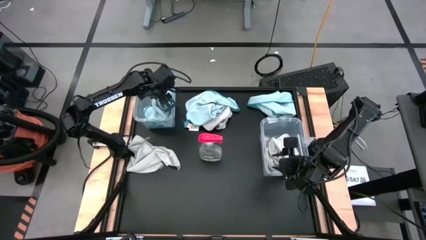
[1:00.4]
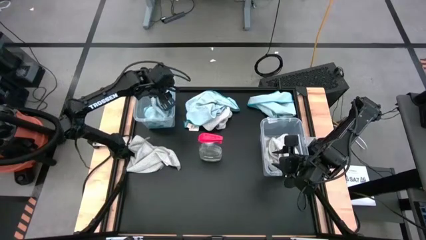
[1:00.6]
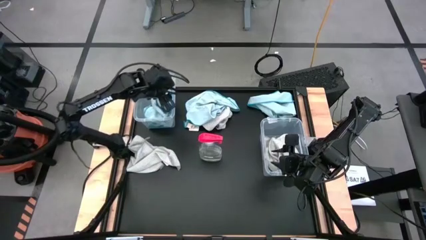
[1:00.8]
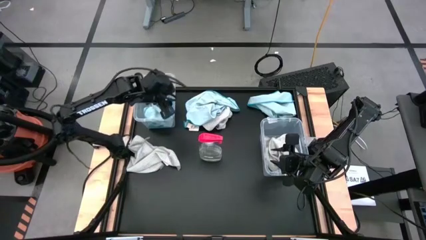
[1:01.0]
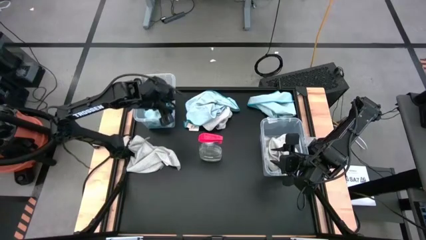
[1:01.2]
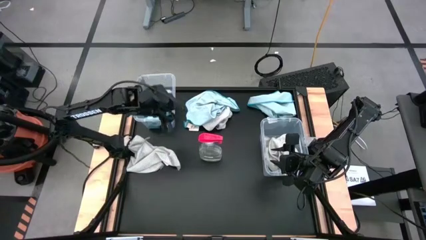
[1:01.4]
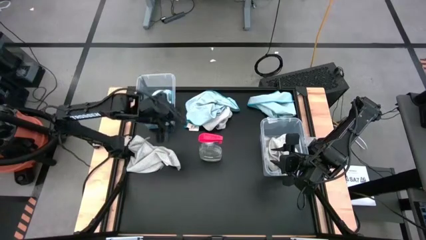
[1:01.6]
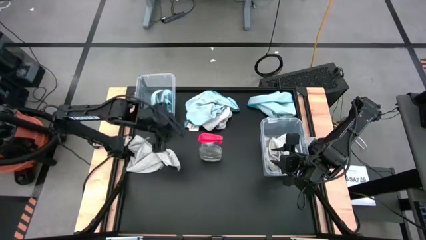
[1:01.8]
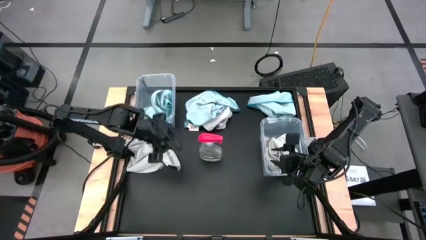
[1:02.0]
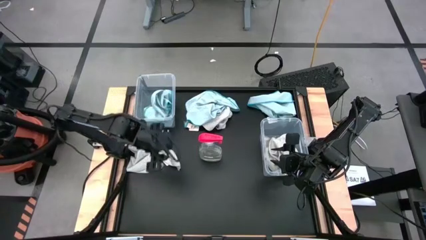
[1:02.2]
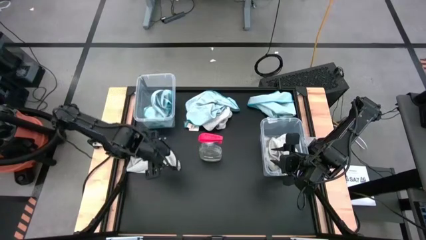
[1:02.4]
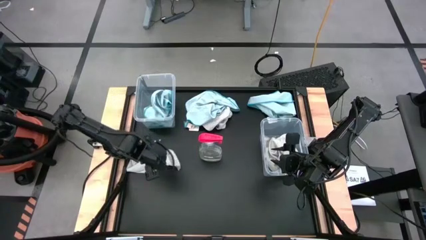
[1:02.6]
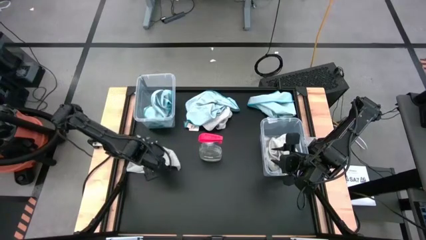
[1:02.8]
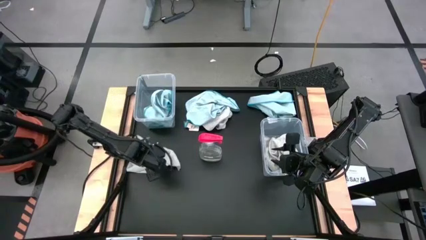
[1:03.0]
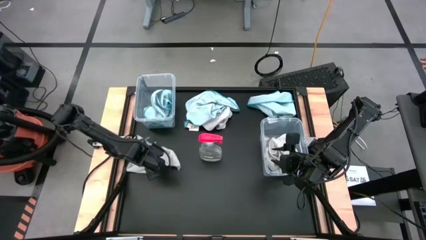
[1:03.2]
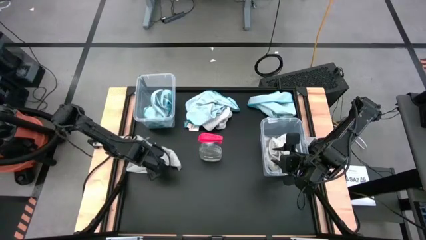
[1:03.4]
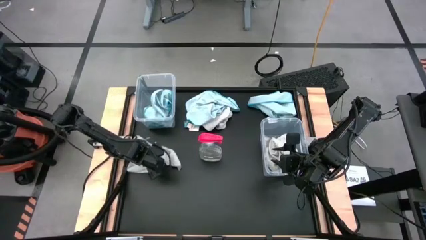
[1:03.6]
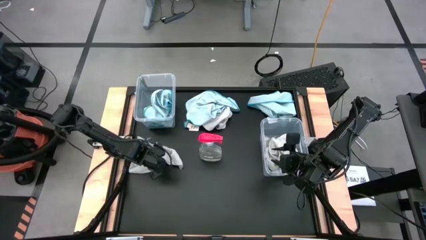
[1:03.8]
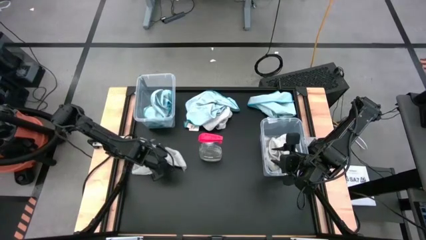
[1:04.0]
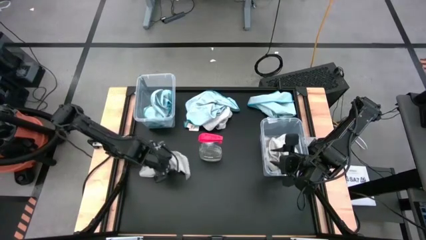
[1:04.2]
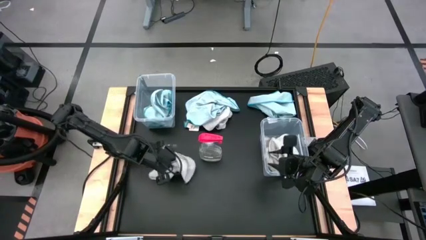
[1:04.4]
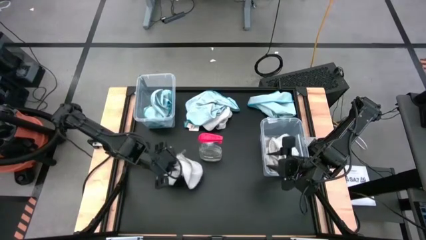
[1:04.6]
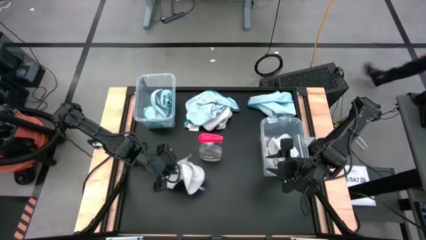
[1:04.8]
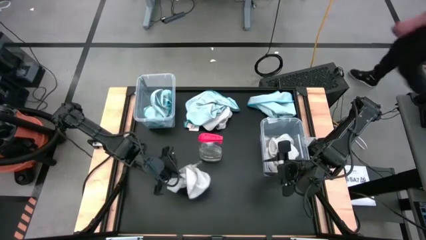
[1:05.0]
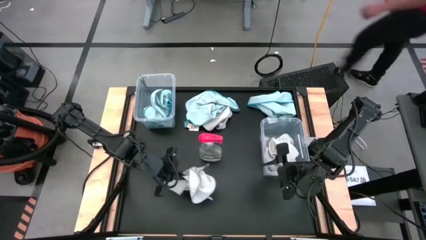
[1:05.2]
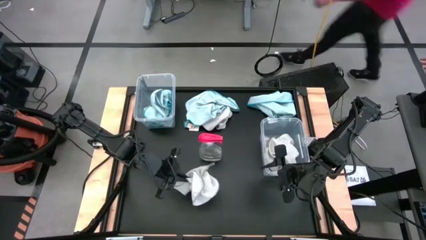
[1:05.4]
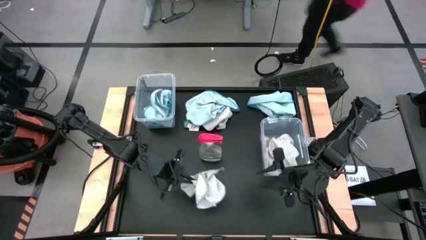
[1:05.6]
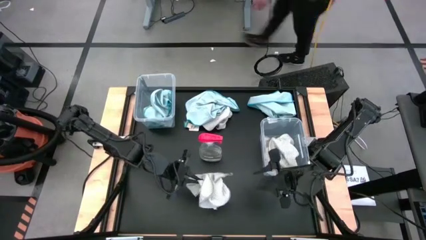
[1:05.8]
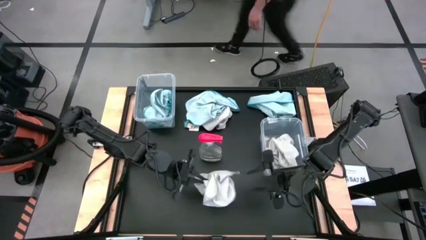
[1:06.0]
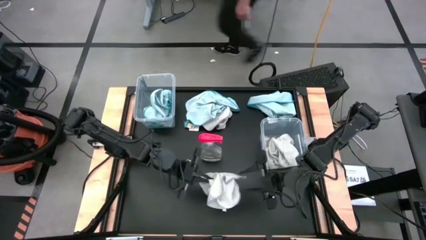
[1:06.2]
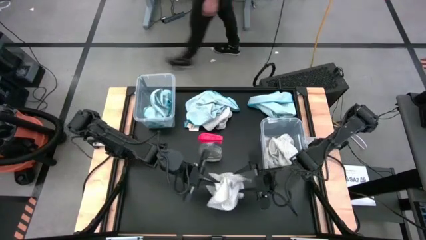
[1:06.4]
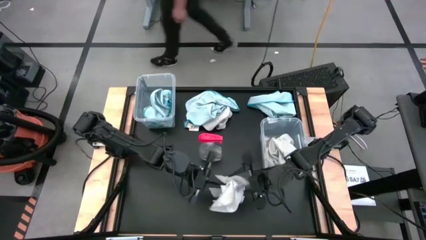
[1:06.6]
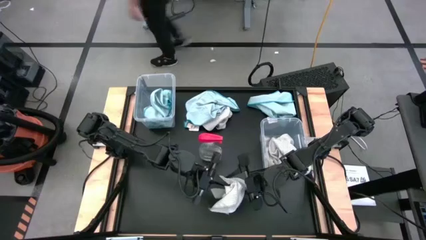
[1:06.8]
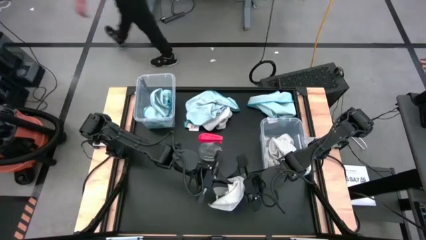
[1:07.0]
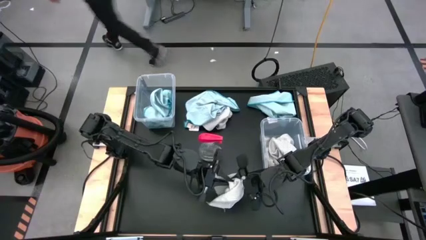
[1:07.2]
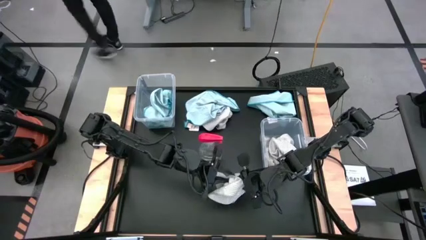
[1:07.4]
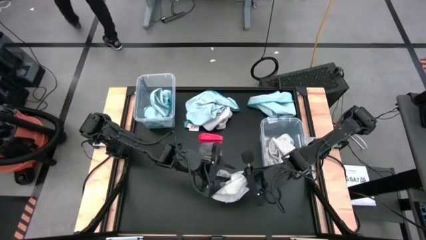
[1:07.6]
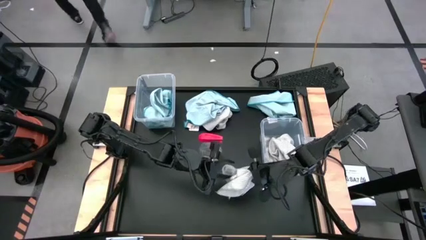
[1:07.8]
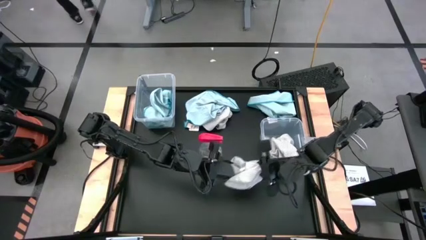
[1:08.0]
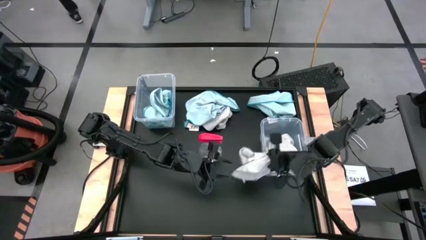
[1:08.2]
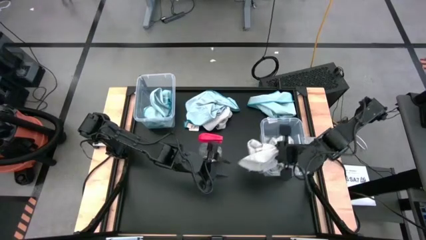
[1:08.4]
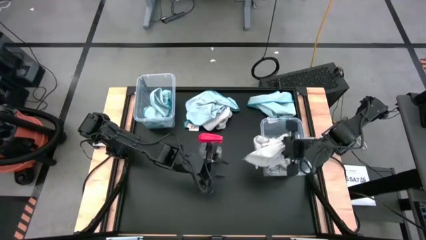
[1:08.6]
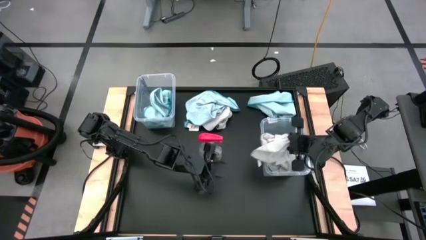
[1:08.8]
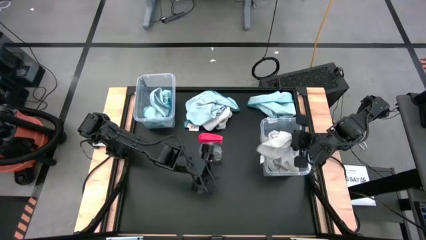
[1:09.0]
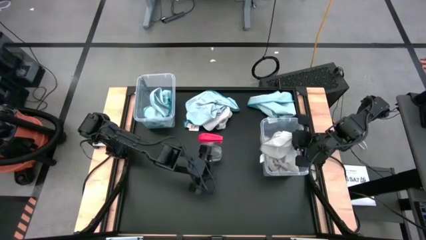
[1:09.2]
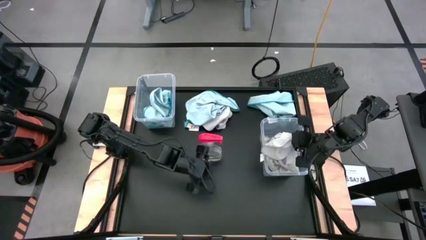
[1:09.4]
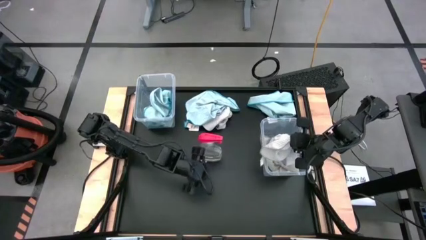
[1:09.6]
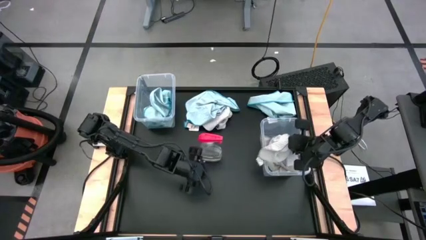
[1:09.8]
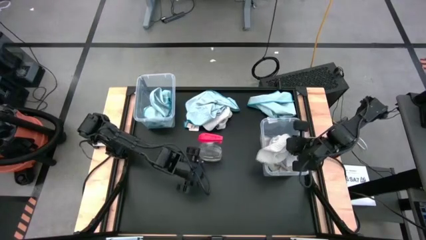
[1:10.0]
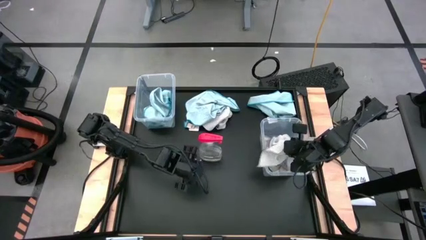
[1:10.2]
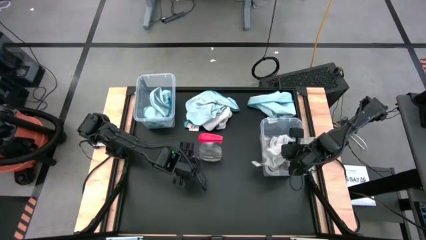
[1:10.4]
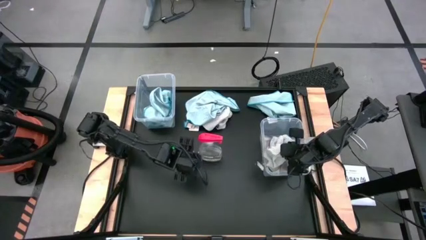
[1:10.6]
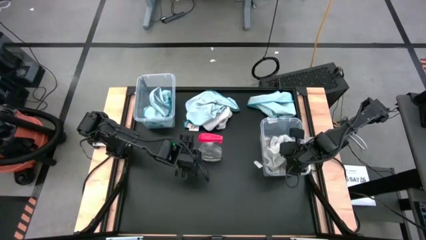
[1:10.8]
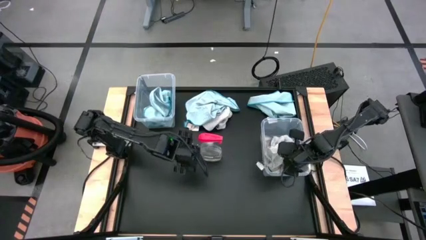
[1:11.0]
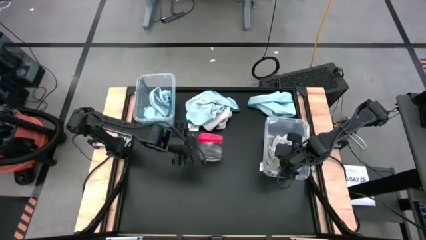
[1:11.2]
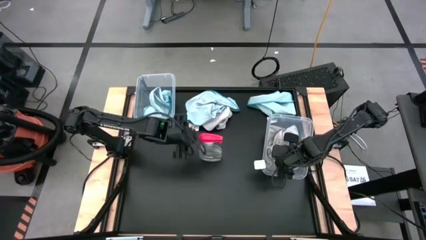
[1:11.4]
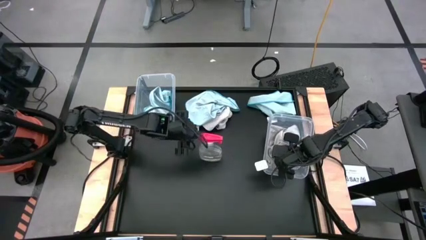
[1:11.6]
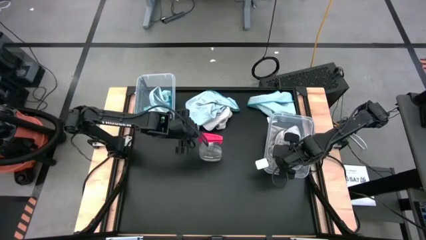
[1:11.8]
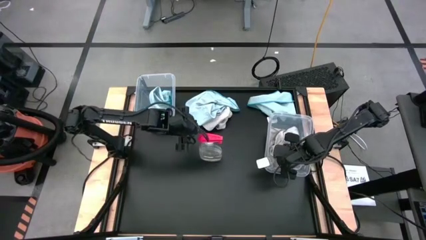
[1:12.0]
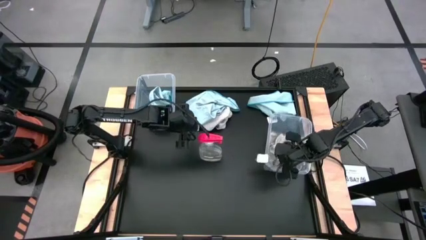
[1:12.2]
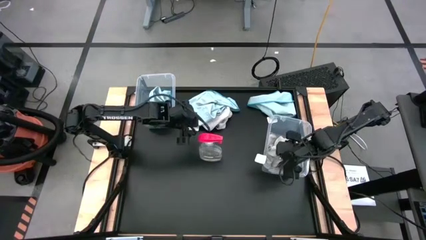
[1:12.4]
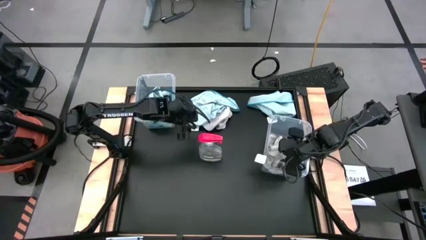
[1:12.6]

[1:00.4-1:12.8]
Task: Sort microfiber towel by color & place in baskets
Put the bottom gray towel into the right transparent bin

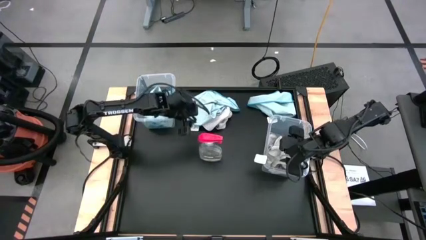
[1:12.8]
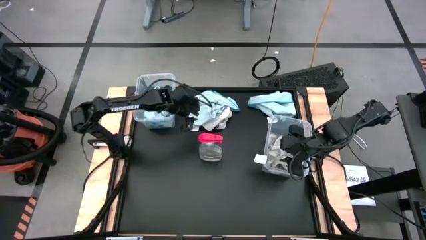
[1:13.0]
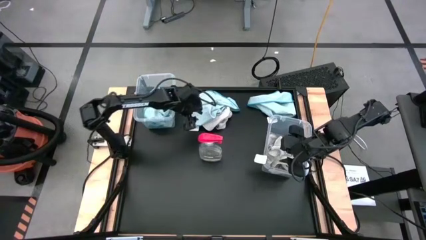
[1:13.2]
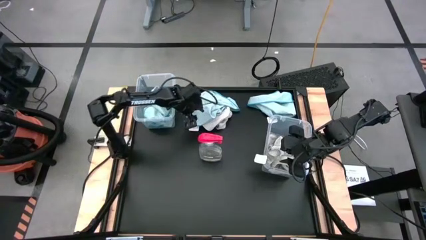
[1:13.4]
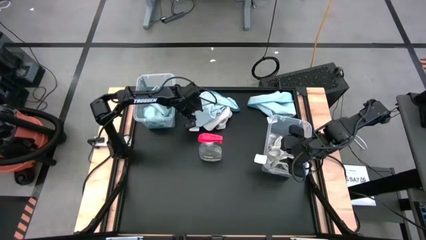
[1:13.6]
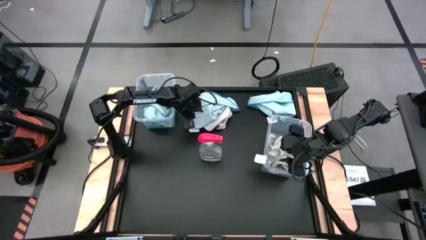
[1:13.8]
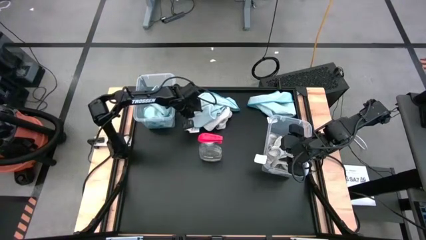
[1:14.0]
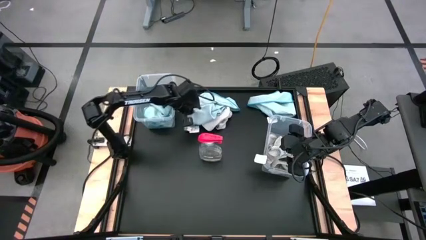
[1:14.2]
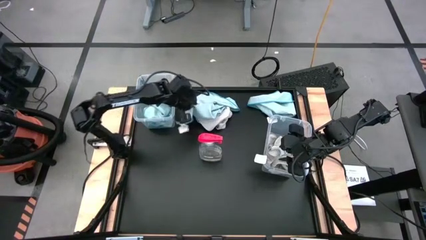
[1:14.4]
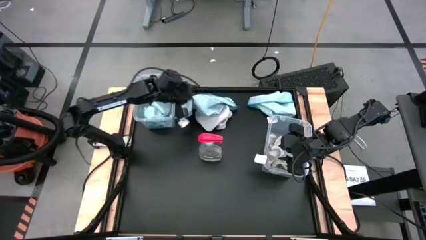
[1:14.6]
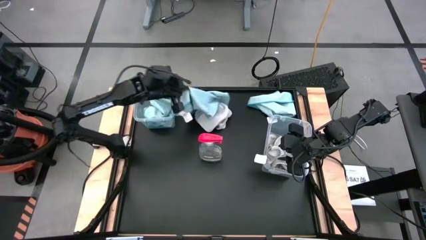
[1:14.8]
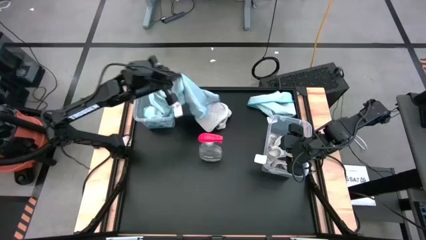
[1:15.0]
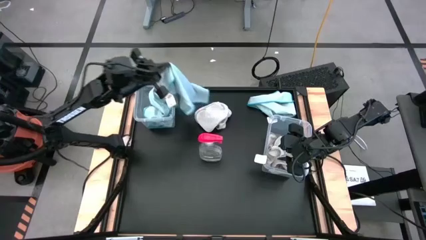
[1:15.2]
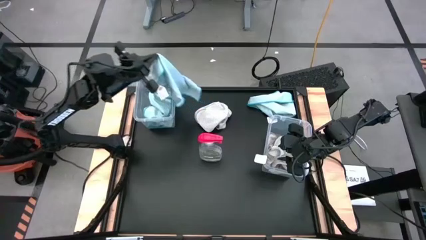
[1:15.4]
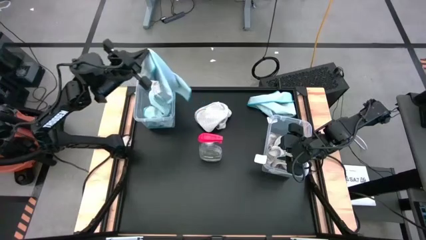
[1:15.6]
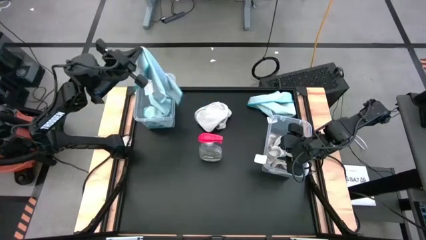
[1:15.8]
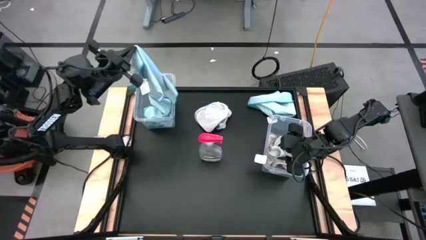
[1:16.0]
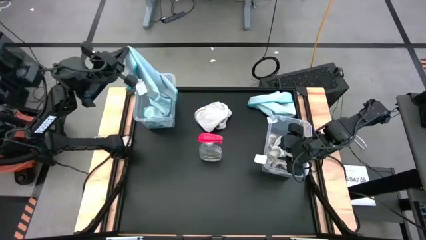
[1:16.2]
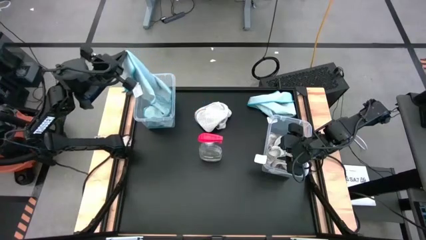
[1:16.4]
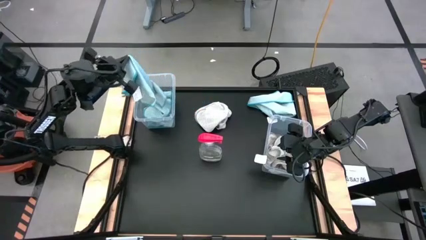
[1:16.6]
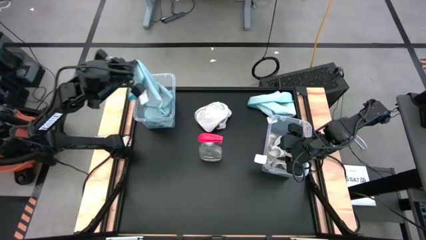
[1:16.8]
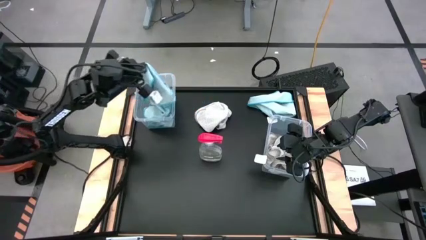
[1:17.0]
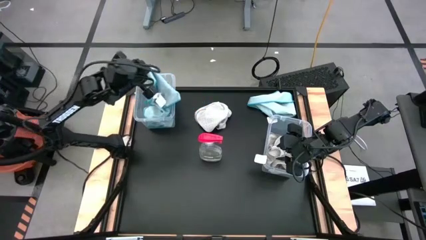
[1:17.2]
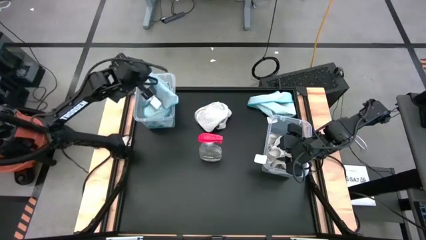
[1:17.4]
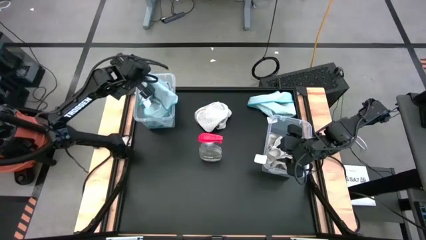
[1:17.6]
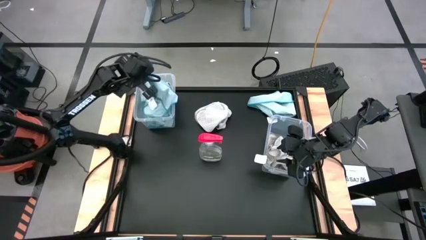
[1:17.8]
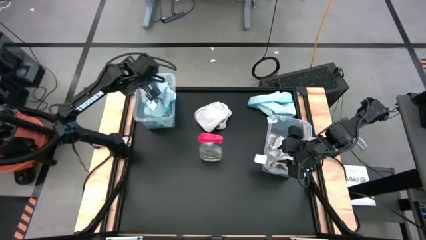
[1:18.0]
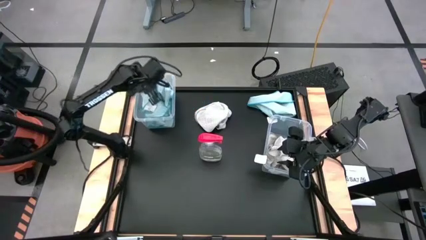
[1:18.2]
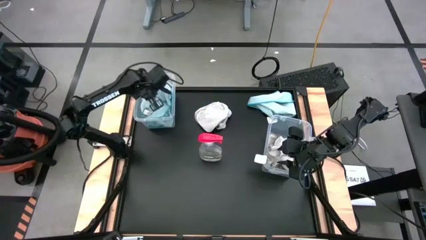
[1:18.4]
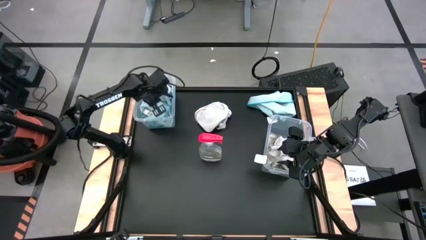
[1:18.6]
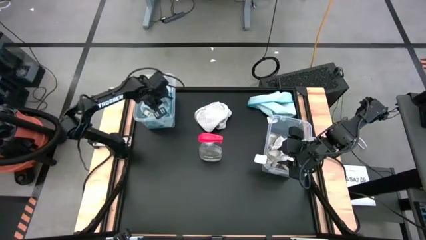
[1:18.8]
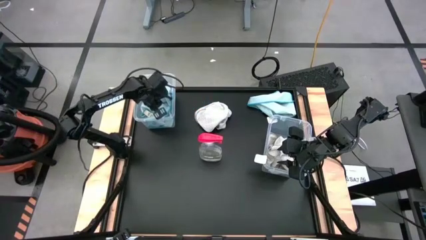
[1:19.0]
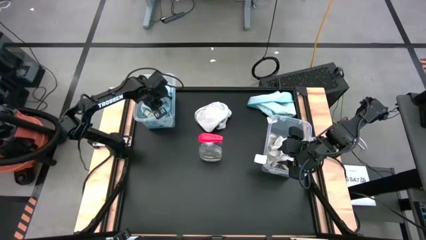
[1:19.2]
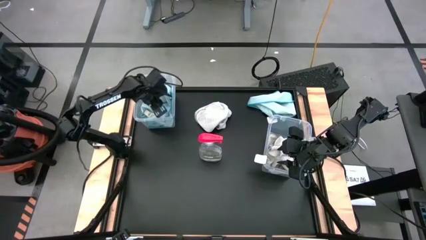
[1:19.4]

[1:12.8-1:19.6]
Put the left blue towel into the left transparent bin
